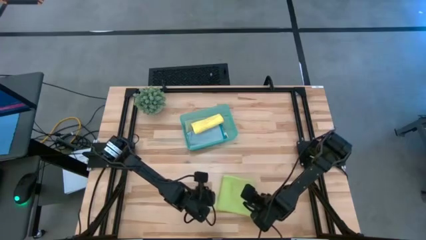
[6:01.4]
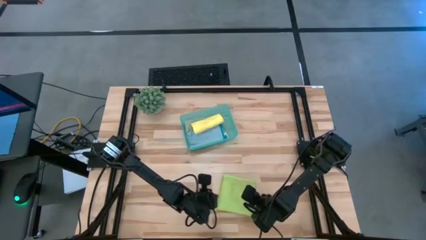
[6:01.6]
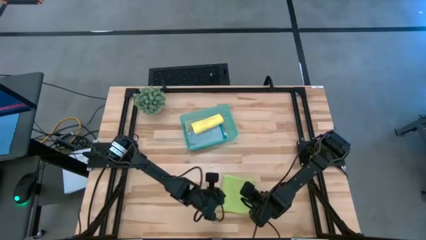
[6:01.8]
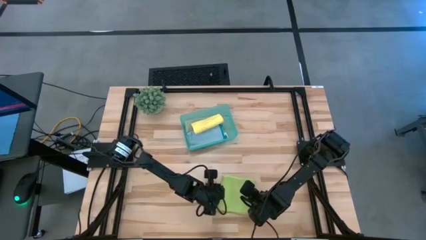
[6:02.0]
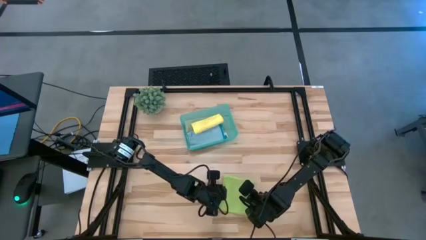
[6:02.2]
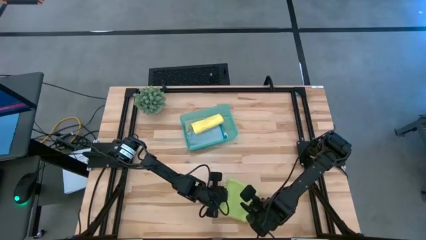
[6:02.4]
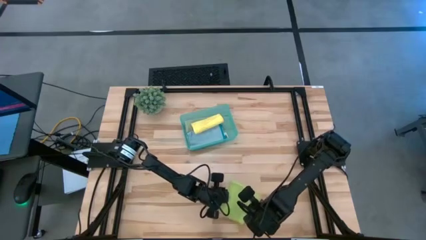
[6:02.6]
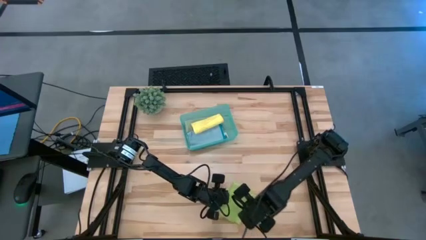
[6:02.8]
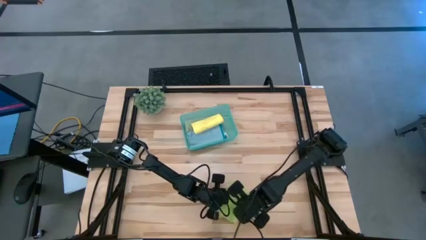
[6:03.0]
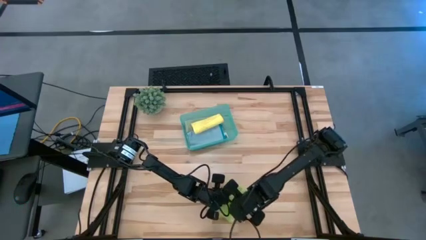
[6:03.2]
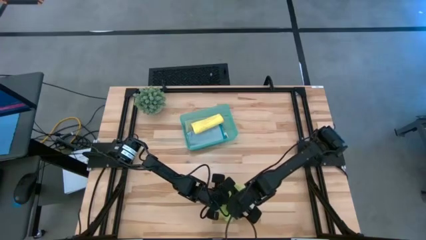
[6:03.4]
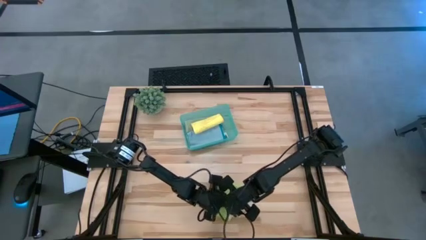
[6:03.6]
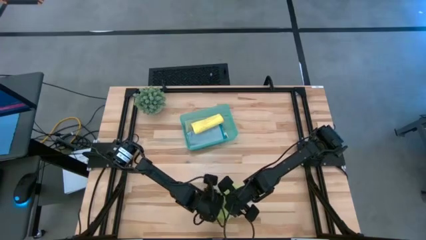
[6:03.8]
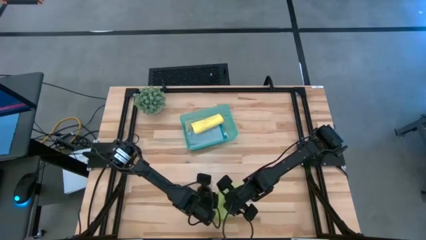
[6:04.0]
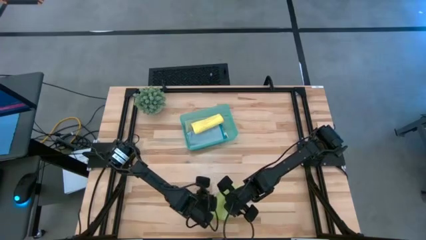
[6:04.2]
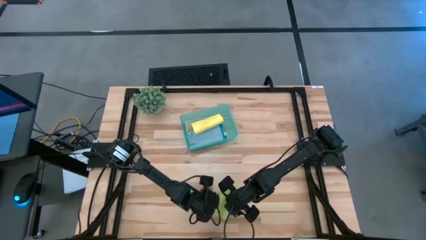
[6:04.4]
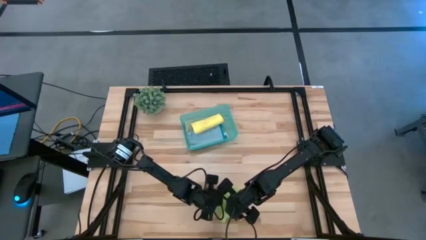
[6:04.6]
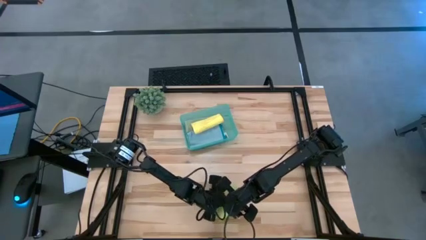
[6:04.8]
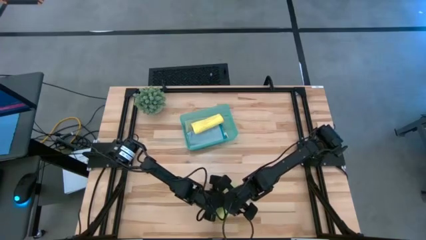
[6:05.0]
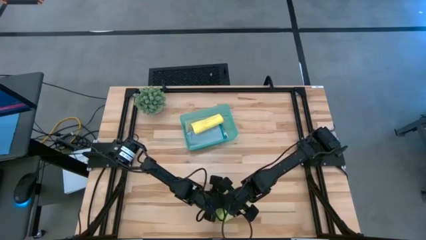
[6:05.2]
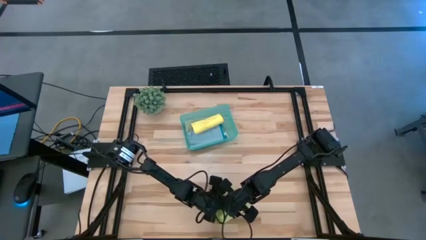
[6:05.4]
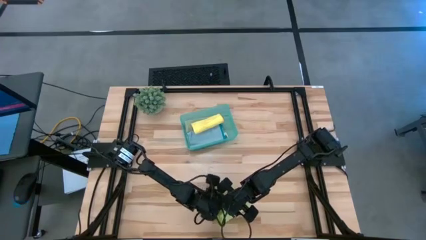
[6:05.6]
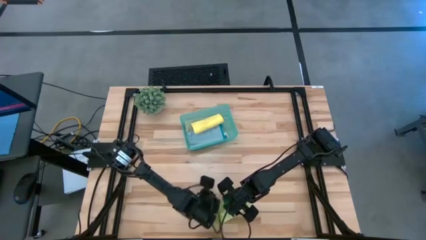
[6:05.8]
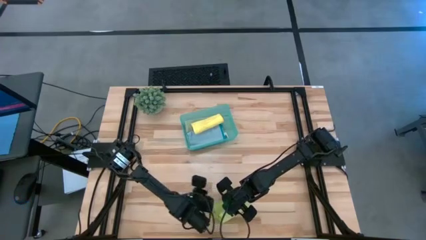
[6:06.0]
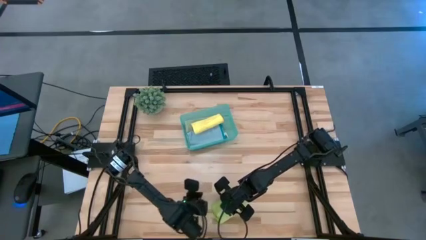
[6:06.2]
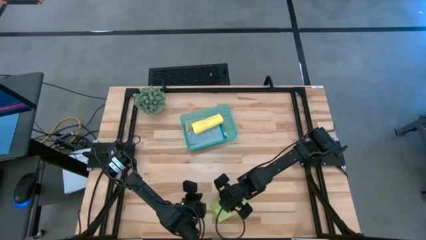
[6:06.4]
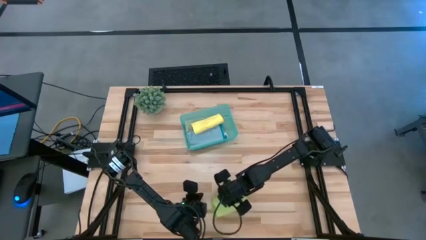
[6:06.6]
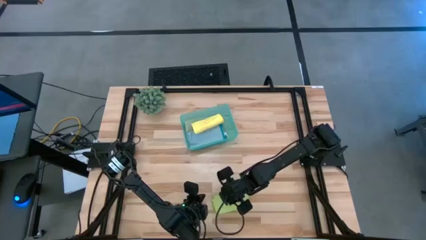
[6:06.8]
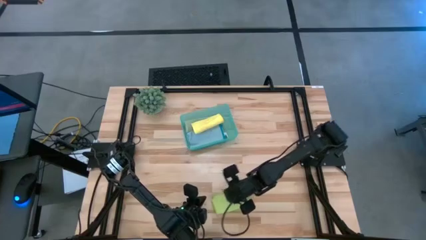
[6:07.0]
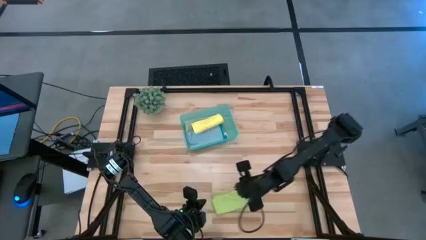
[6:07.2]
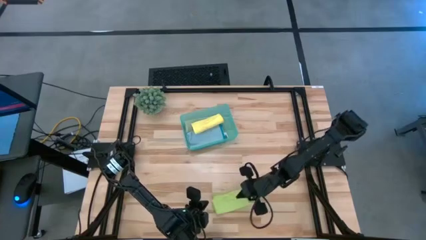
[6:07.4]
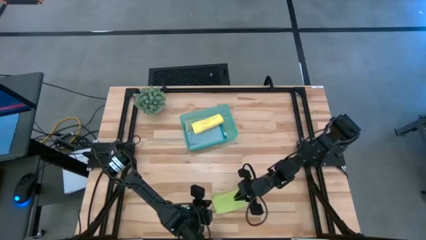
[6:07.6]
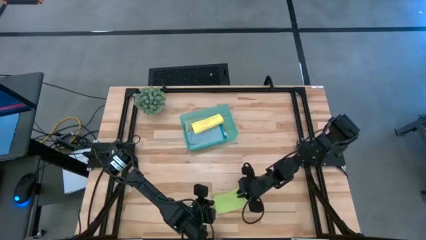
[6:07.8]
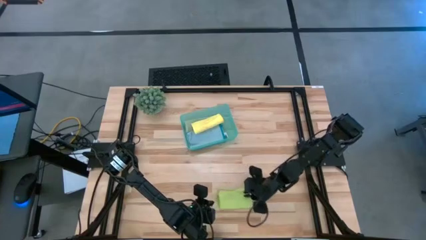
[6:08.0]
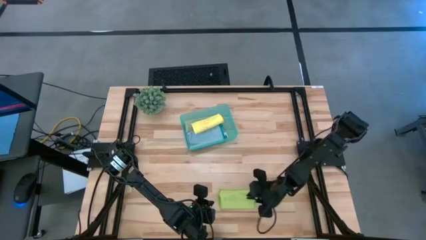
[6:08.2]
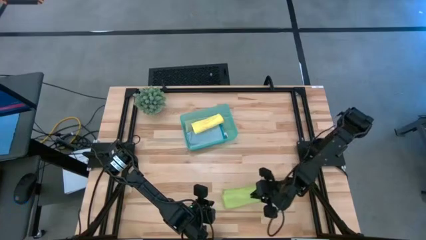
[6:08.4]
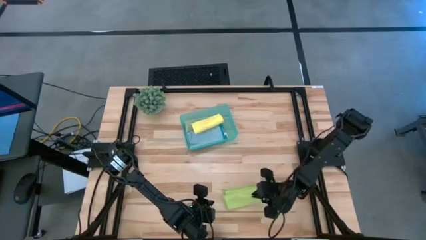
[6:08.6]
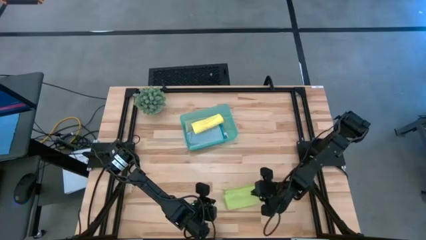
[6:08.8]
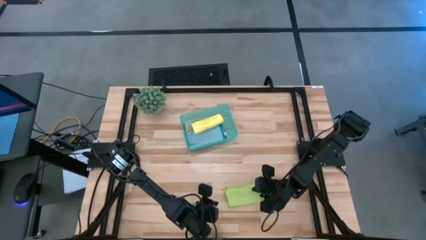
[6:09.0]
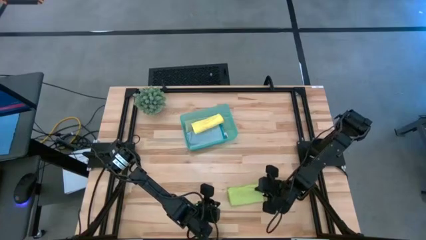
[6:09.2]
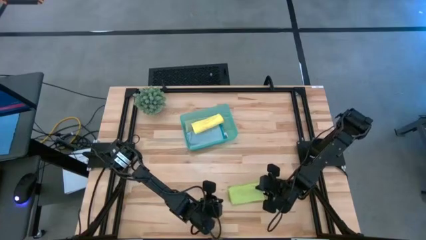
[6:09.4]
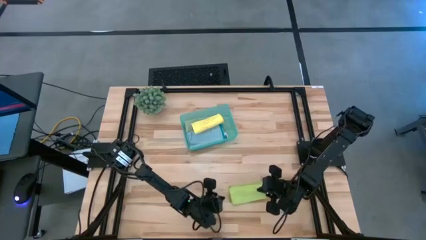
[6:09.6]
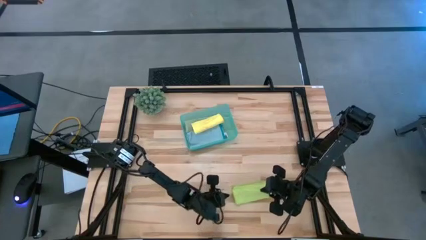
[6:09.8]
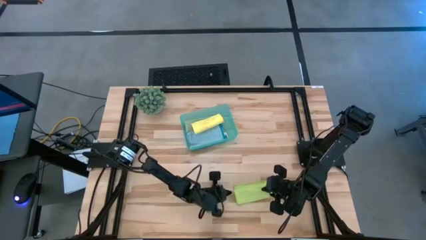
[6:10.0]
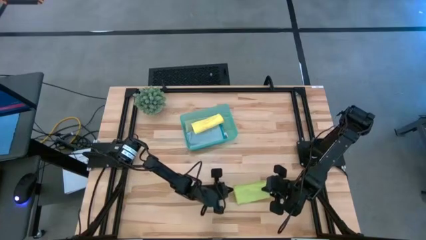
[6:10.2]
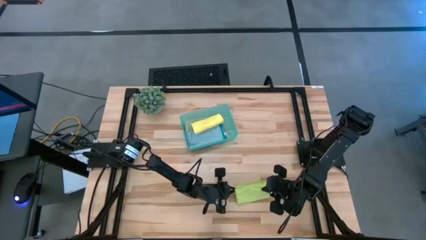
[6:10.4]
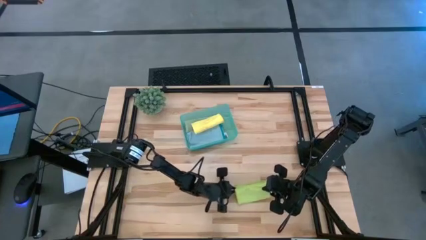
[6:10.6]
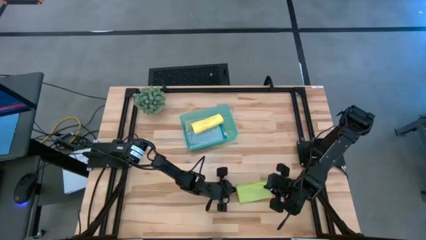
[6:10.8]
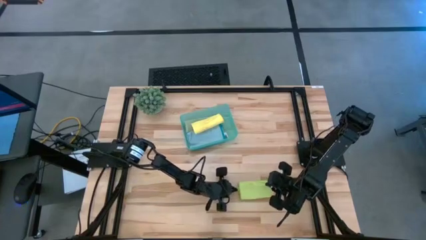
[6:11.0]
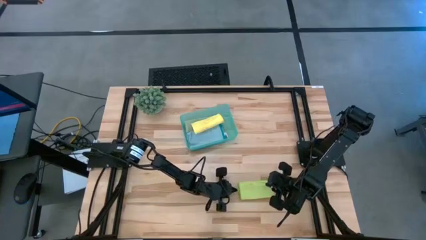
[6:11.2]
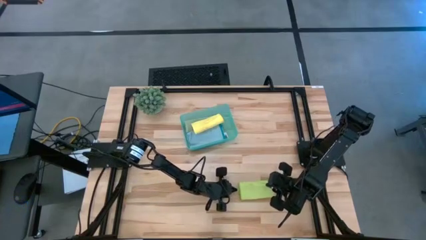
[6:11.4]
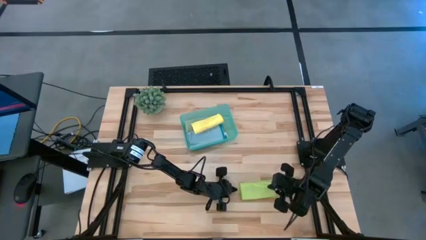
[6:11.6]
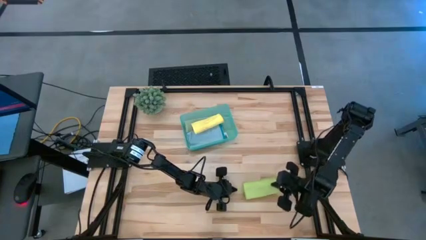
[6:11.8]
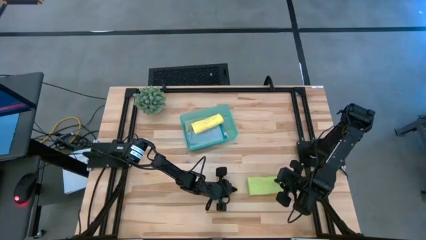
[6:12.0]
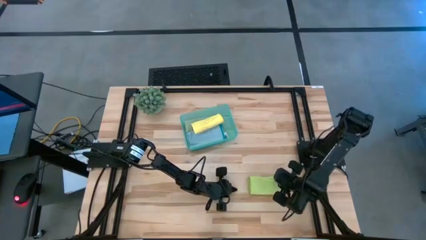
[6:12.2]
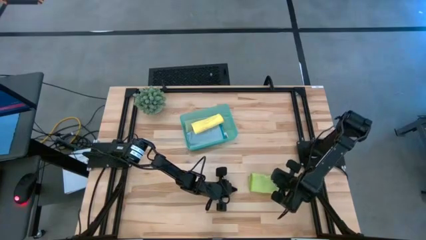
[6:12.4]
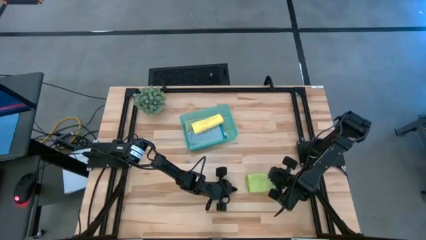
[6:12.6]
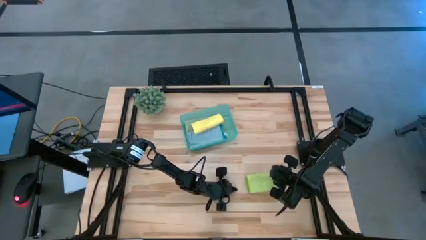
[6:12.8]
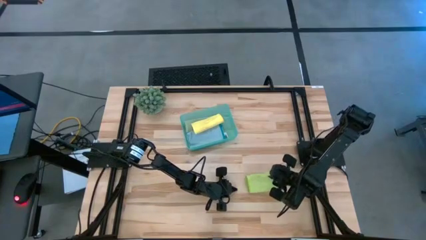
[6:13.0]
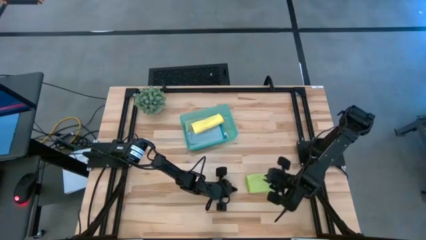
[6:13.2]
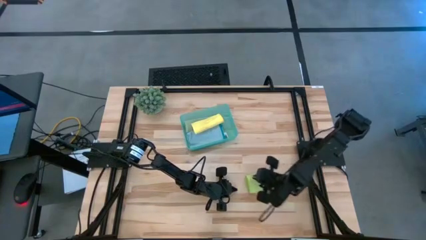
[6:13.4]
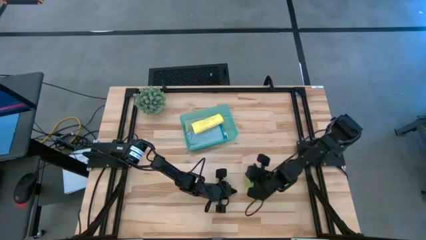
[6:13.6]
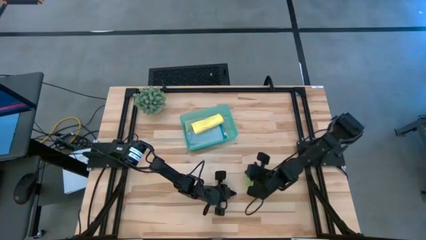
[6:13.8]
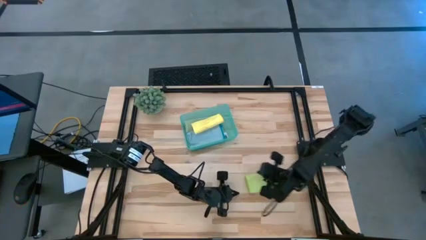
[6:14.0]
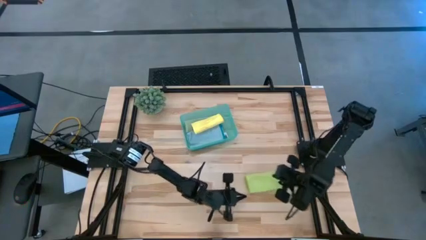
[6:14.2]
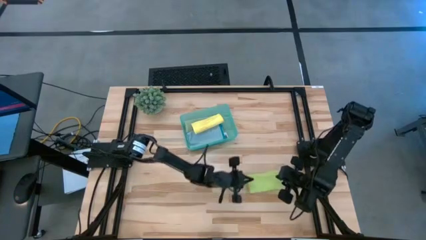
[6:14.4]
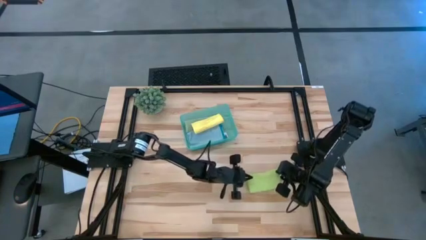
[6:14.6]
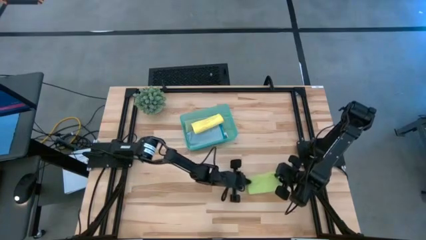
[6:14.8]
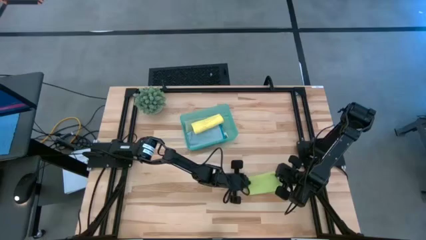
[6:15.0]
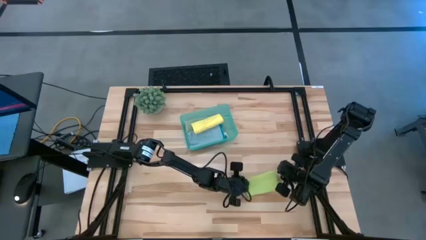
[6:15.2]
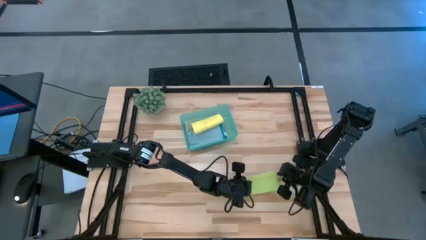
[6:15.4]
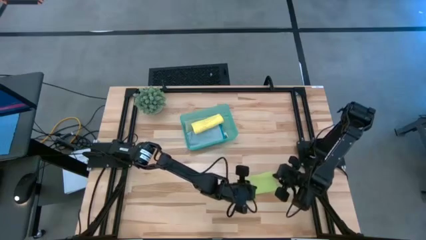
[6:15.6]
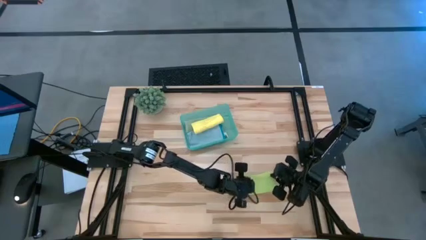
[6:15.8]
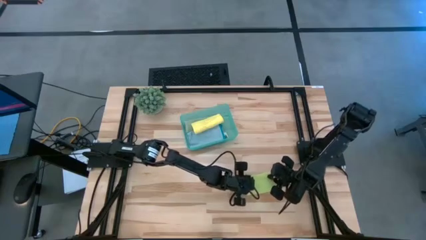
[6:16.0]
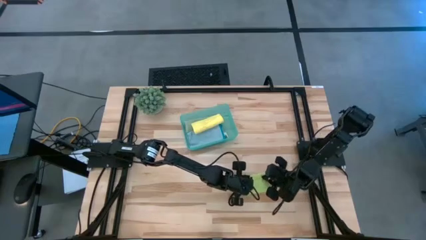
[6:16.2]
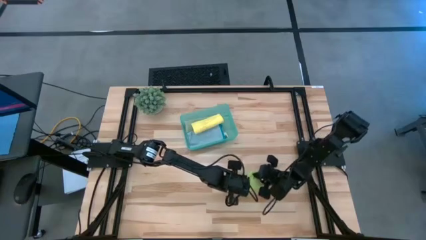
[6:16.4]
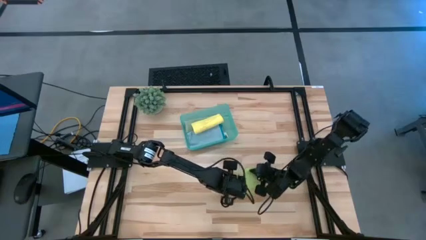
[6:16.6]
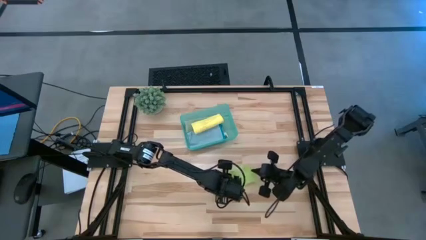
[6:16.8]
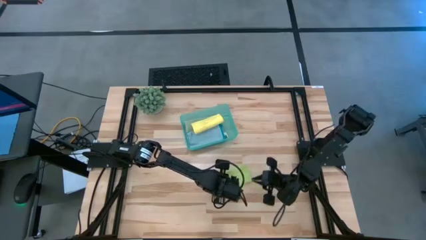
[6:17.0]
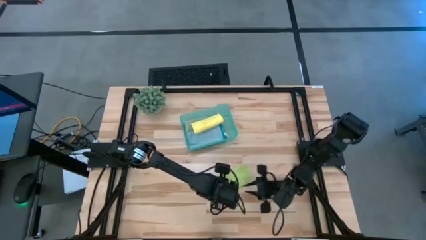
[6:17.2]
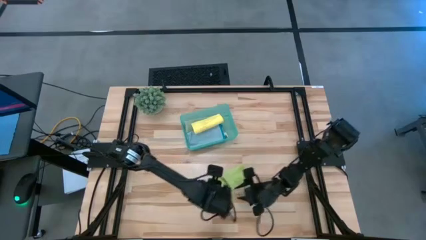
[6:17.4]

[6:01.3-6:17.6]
Task: Fold microfiber towels
Fold the light green towel
